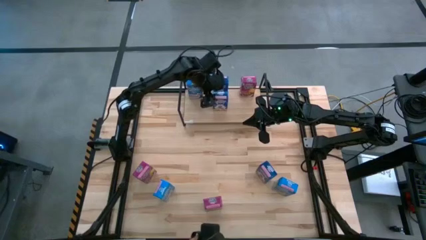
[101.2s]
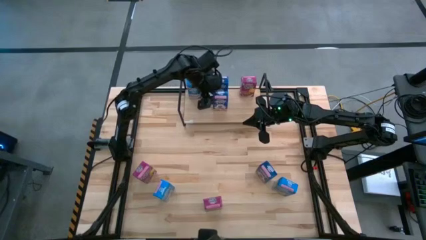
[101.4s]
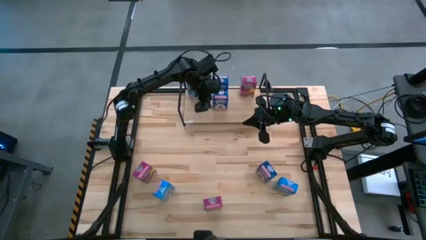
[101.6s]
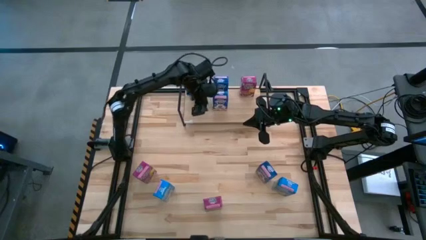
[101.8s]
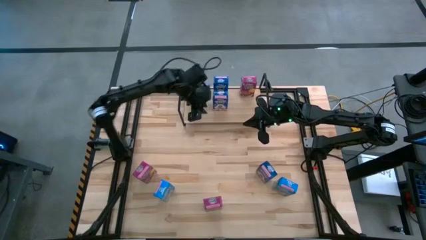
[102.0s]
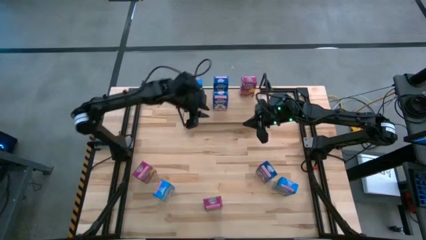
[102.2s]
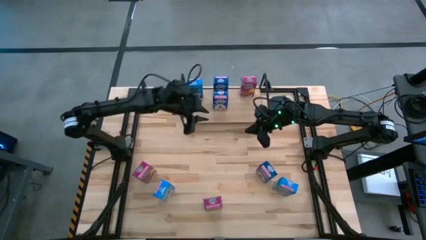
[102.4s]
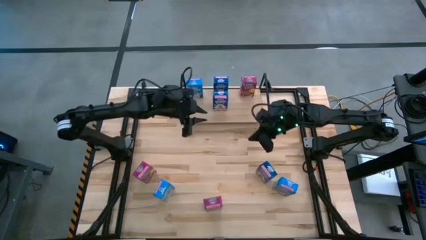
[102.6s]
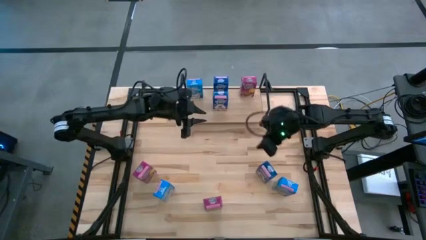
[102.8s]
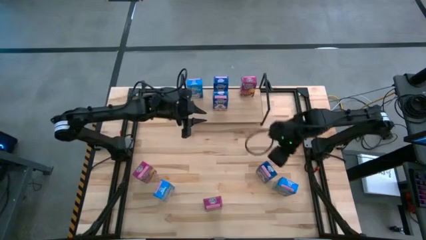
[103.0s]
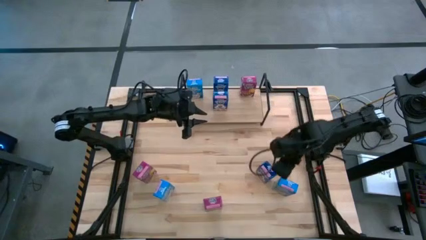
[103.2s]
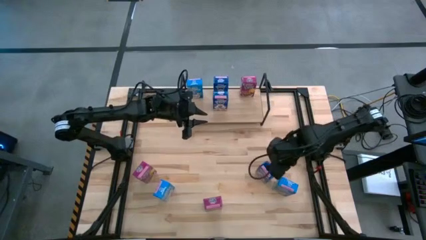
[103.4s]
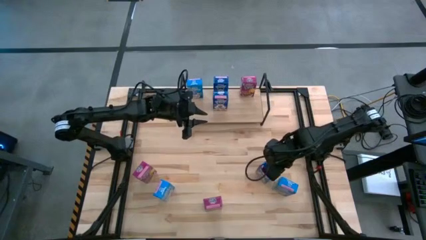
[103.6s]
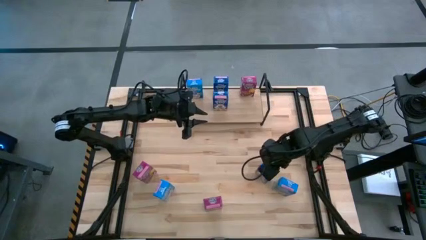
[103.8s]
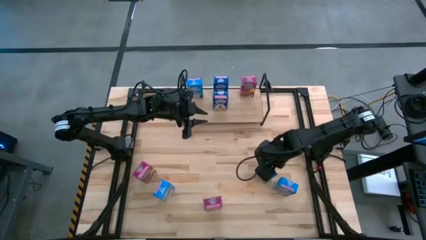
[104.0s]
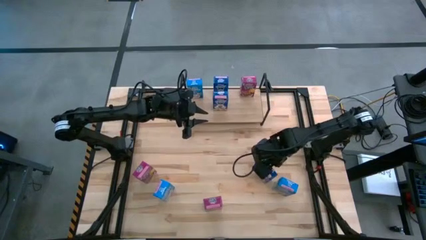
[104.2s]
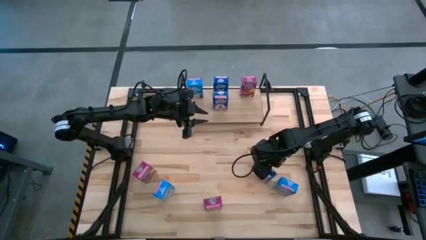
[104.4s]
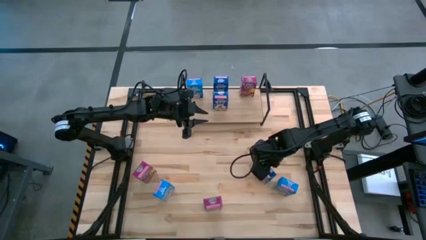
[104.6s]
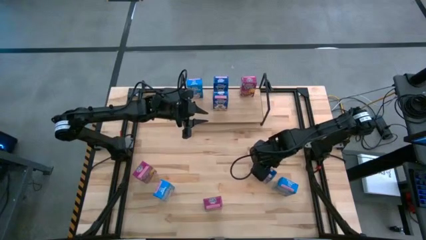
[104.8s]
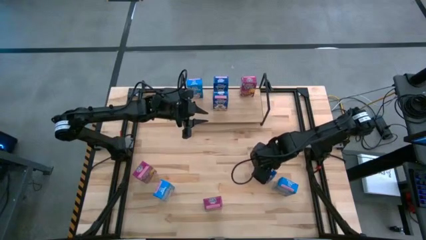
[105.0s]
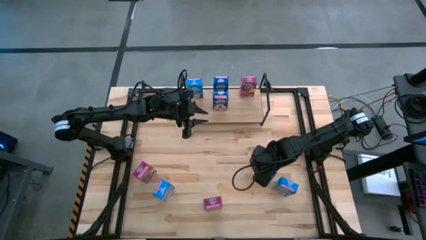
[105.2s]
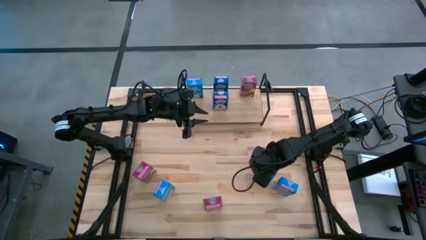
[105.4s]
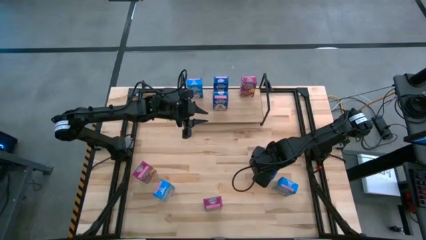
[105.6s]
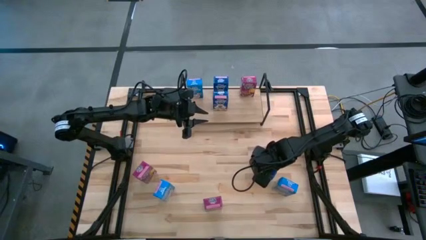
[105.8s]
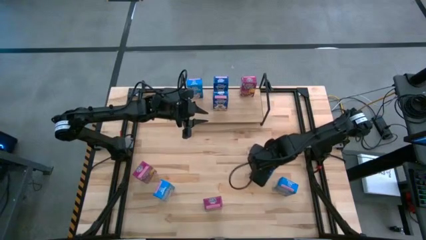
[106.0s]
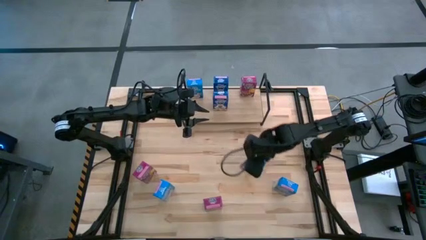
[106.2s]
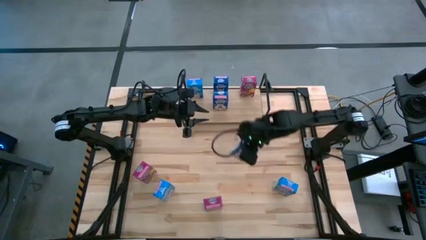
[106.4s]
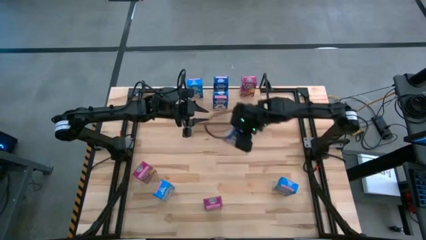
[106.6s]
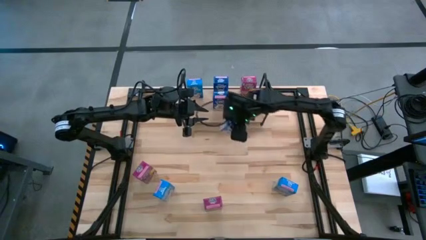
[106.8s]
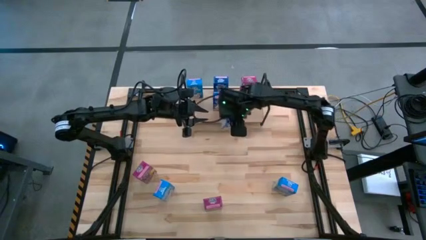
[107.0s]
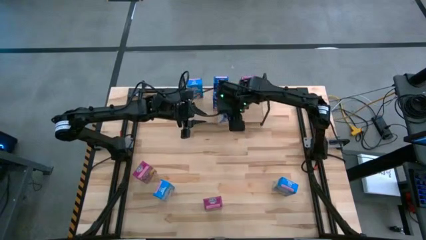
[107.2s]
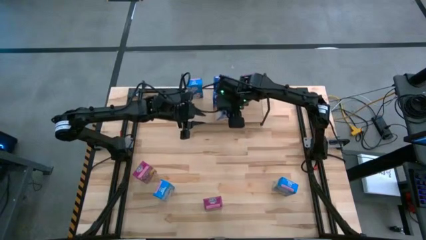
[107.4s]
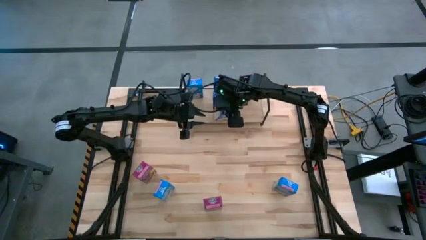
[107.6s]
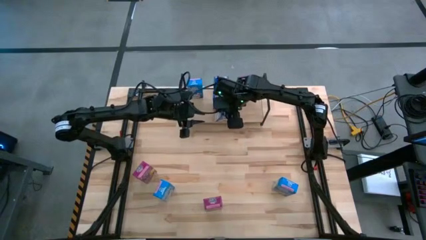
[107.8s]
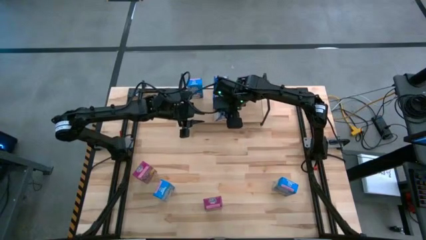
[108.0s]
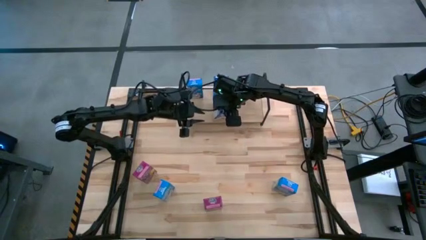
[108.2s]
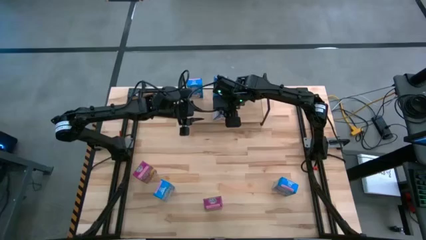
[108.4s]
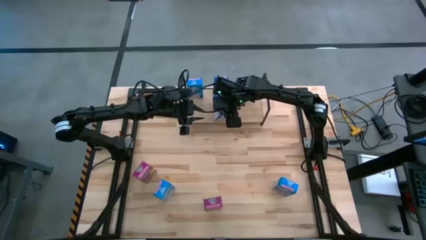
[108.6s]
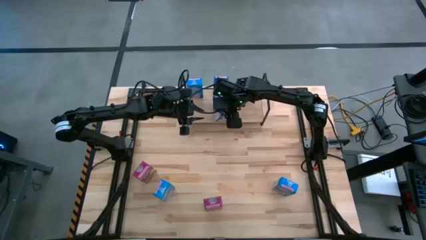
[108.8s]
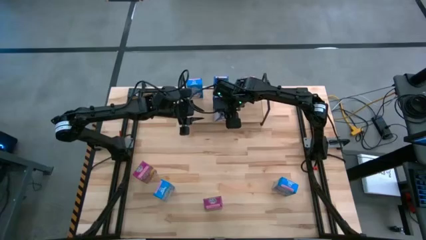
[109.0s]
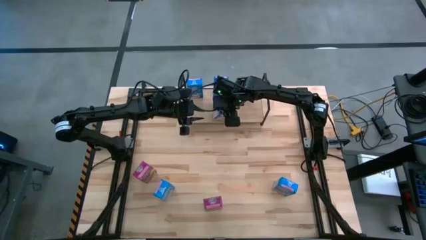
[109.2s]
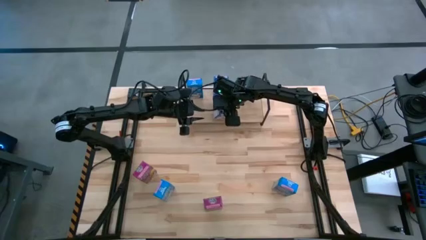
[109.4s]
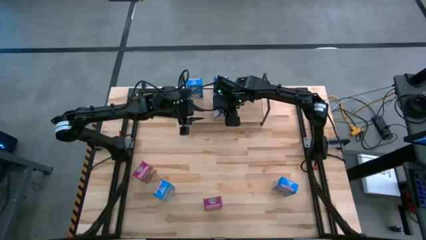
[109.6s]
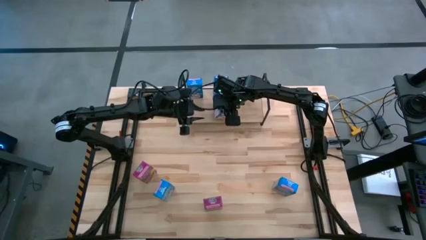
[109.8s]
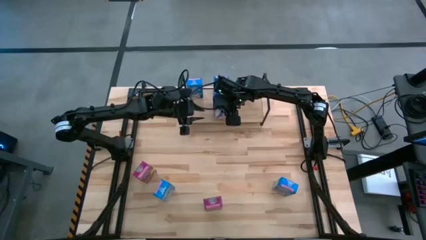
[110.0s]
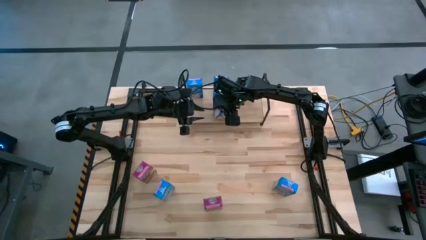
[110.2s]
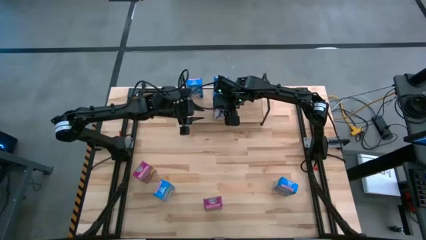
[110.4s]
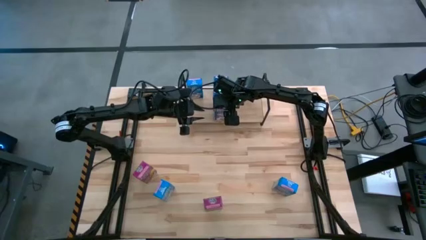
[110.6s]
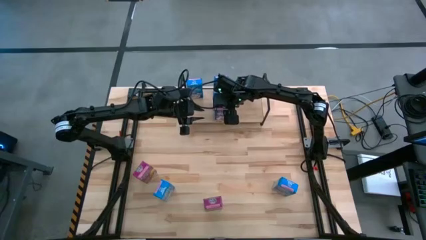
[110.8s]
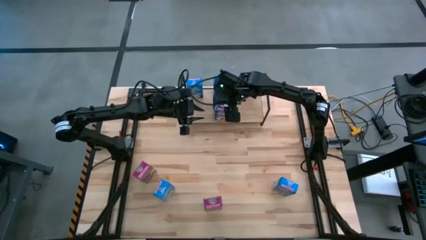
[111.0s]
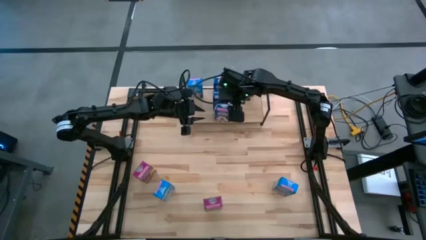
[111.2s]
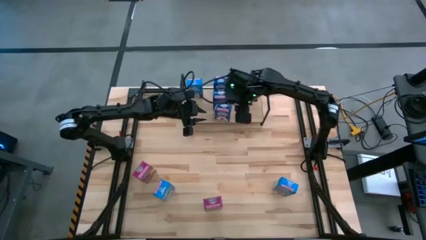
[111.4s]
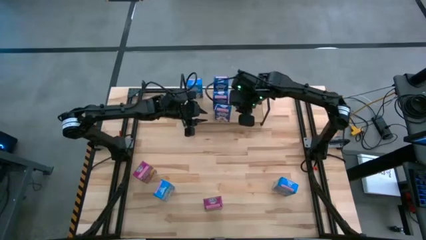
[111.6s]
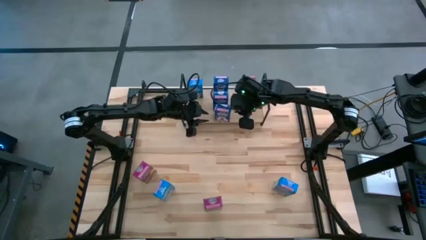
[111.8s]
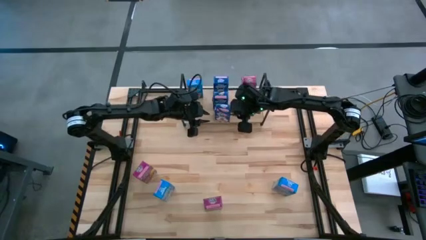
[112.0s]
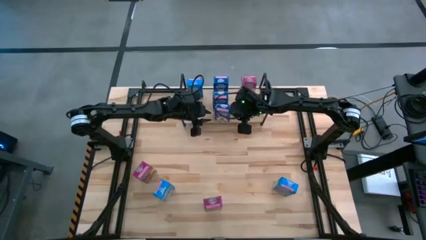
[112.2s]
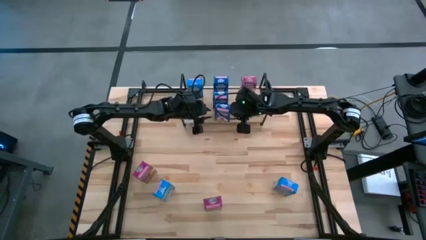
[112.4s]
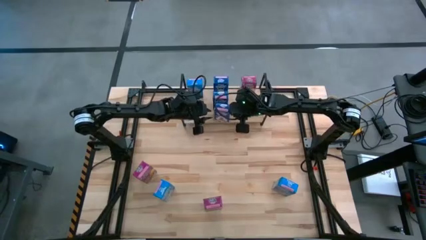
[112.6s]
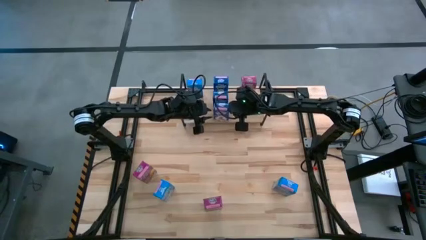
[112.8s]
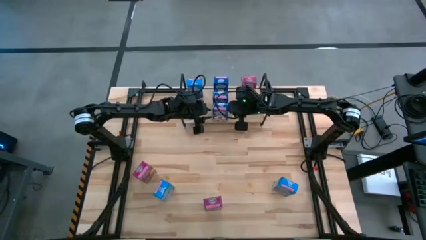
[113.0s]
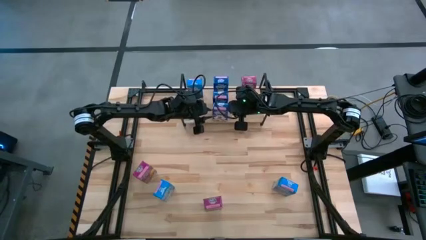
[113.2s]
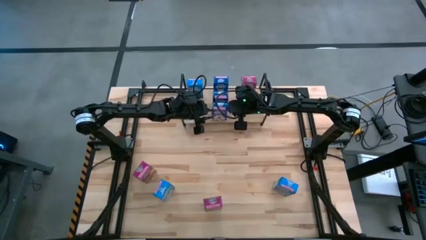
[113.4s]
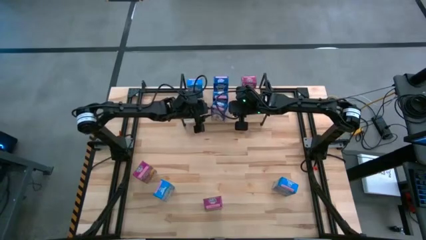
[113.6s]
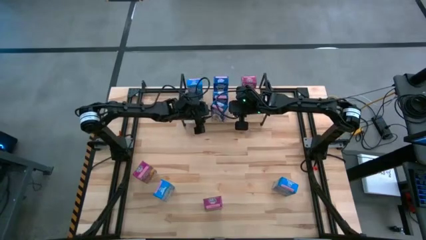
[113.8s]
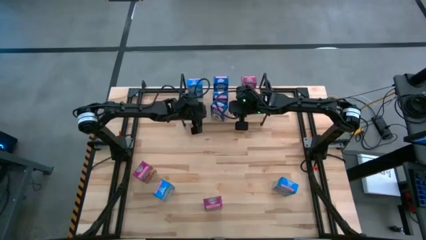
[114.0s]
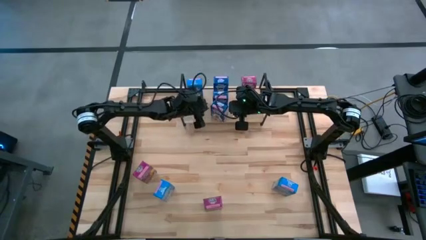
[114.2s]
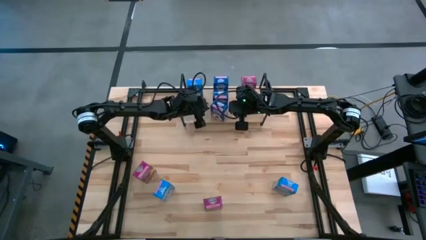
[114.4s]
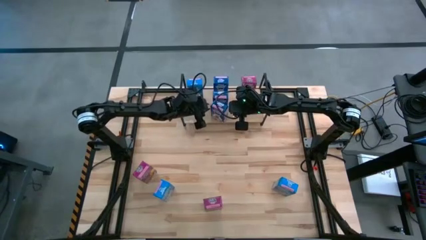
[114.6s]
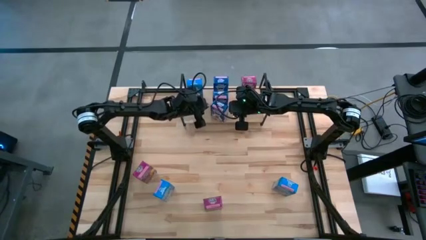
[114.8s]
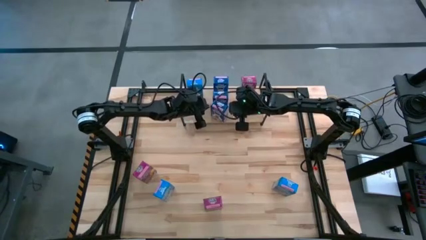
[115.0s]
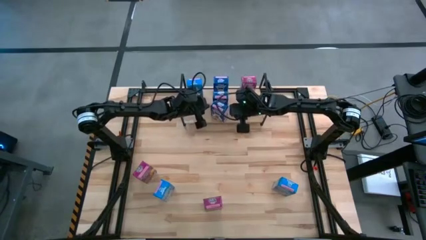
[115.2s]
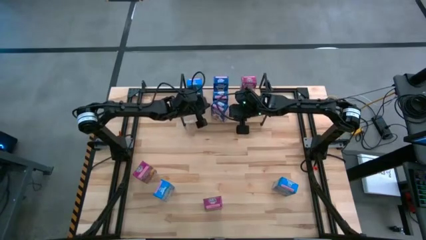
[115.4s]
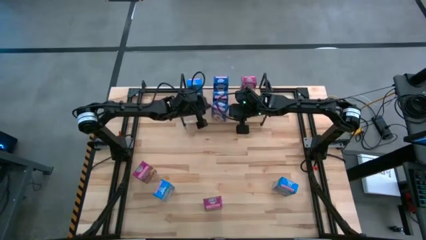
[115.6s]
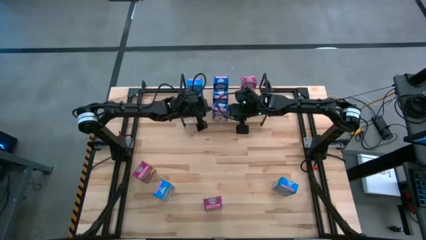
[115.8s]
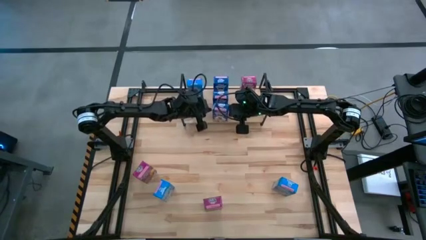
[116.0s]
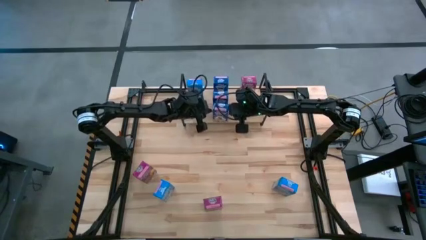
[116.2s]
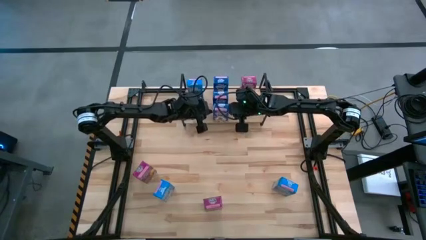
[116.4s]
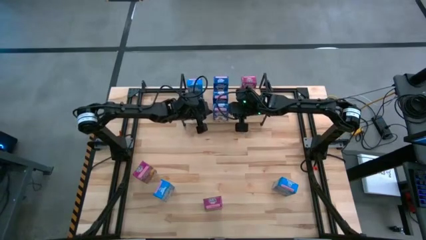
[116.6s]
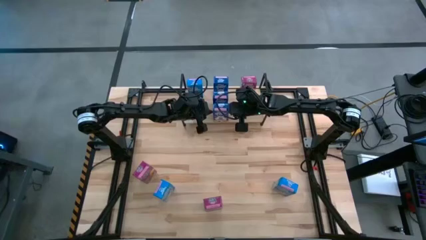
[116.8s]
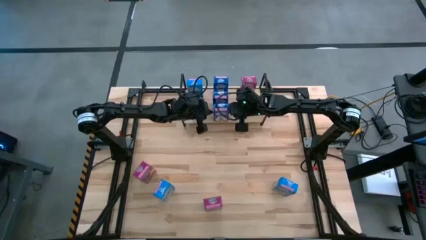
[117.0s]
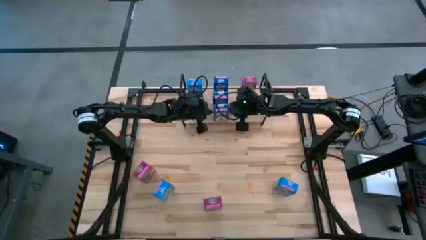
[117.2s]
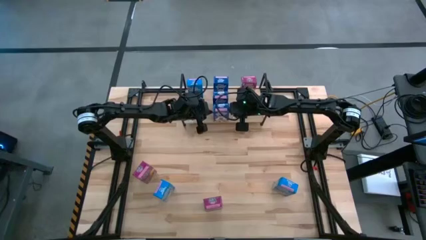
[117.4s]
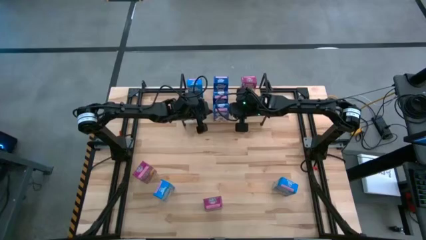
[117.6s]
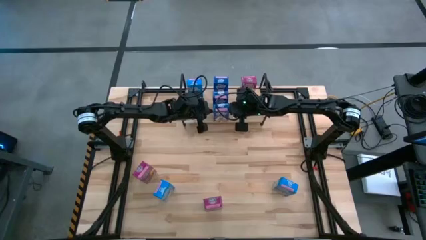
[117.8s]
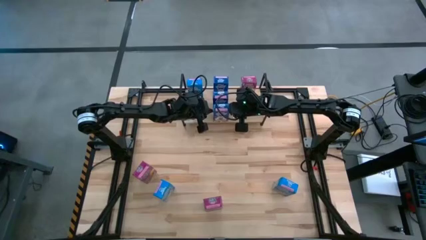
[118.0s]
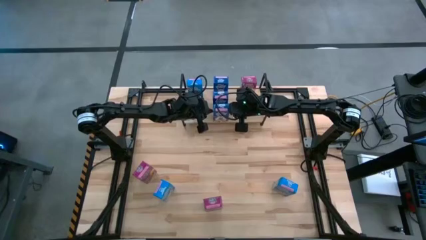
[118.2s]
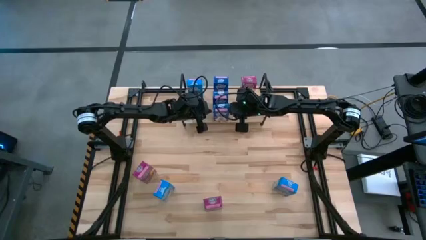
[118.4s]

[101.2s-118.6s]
Task: Stack cereal on shelf
Put the dark blue cereal box on the shelf aligned with the other dark blue cereal box Adjust the dark blue cereal box on the shelf
